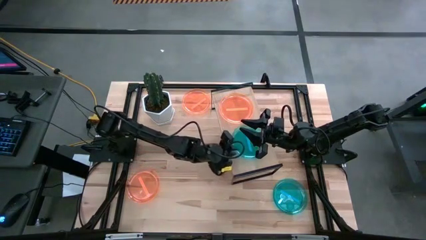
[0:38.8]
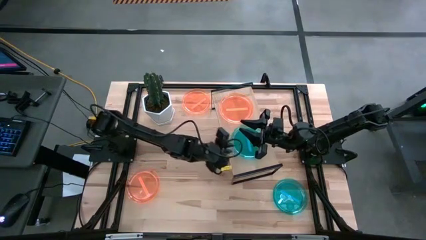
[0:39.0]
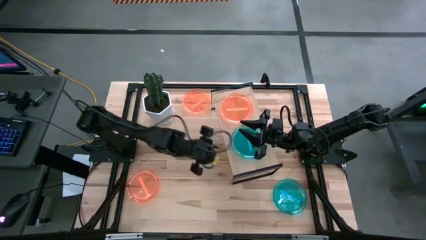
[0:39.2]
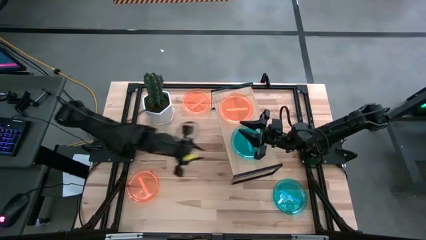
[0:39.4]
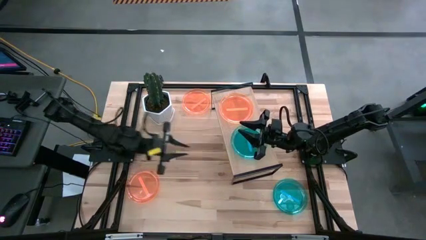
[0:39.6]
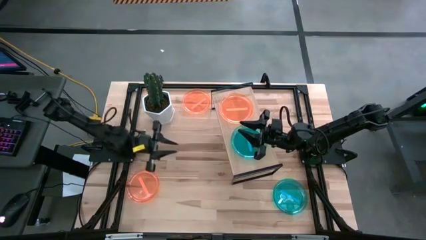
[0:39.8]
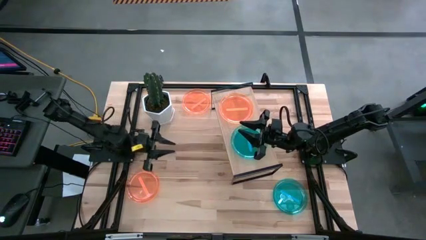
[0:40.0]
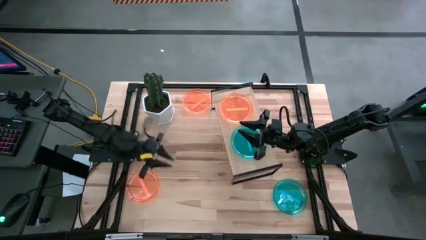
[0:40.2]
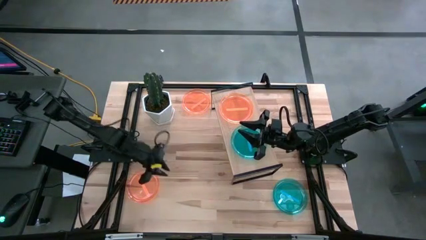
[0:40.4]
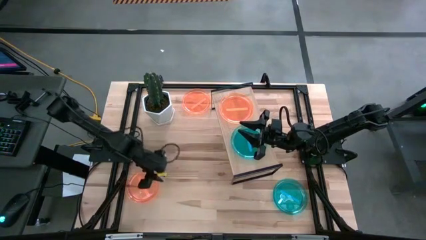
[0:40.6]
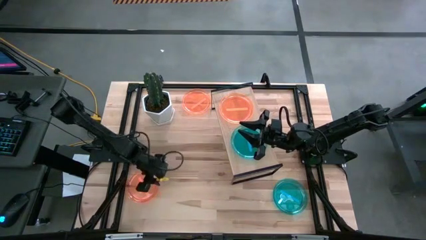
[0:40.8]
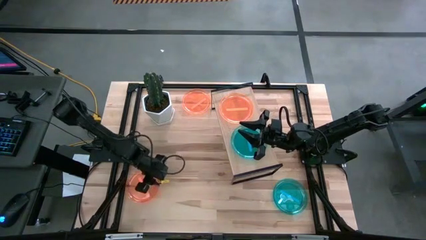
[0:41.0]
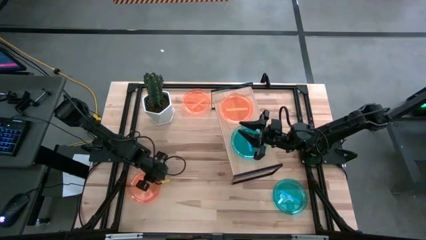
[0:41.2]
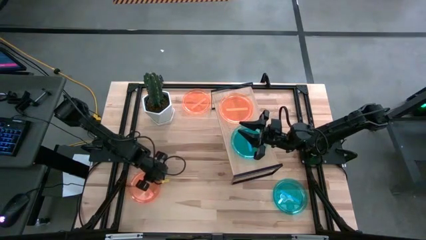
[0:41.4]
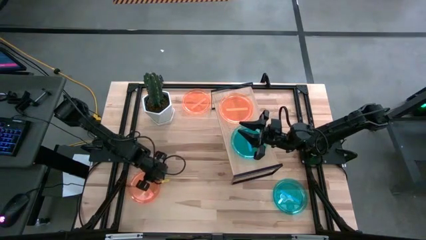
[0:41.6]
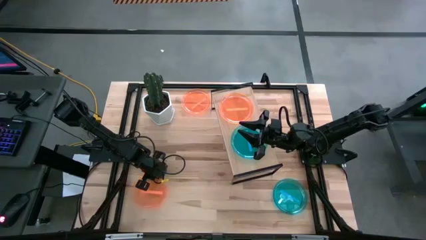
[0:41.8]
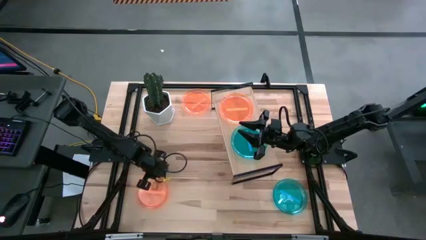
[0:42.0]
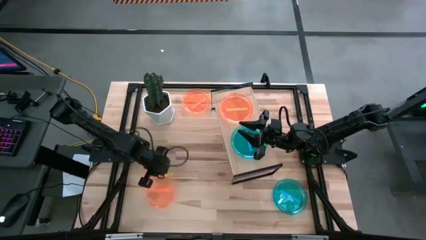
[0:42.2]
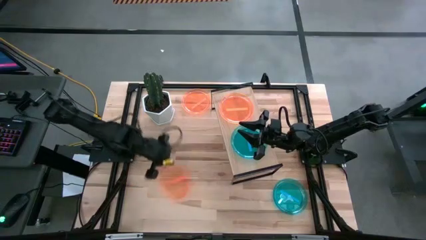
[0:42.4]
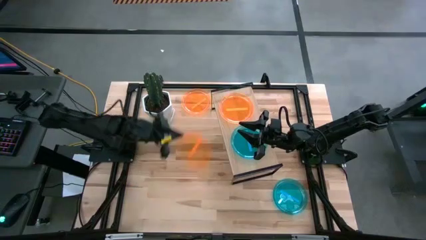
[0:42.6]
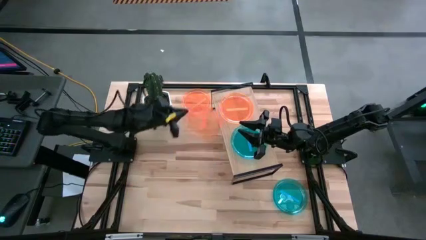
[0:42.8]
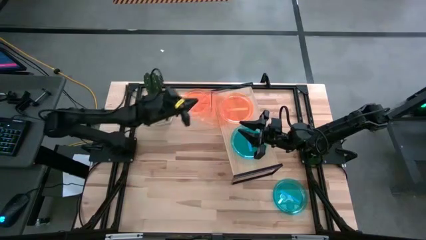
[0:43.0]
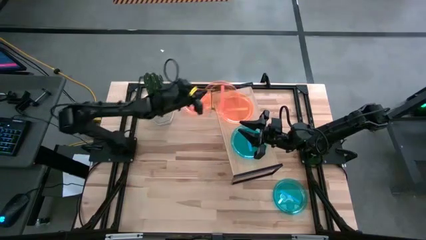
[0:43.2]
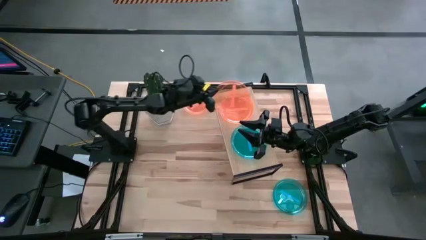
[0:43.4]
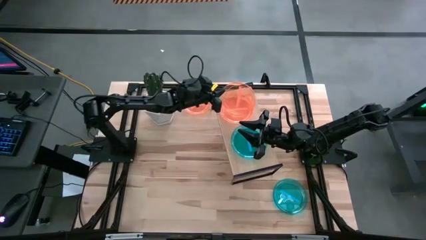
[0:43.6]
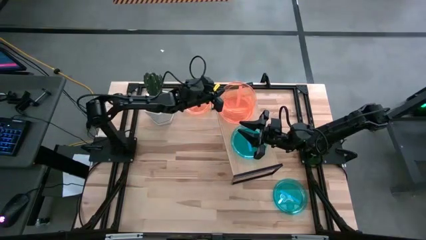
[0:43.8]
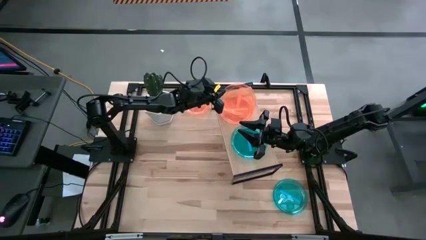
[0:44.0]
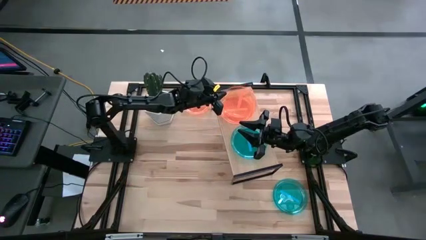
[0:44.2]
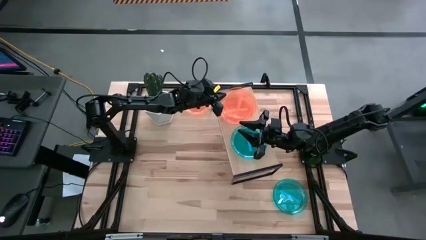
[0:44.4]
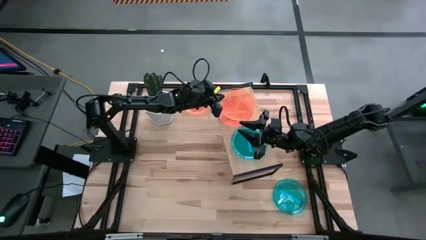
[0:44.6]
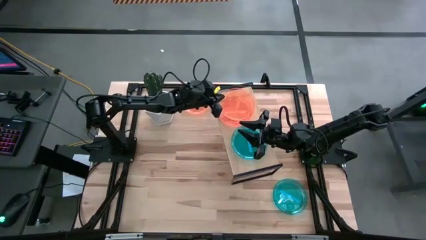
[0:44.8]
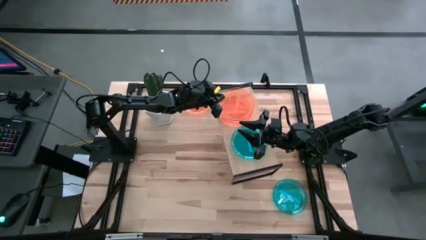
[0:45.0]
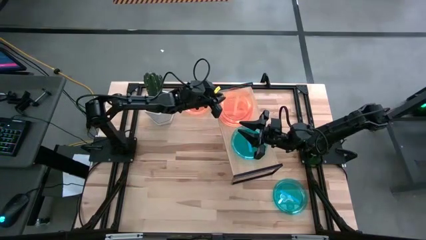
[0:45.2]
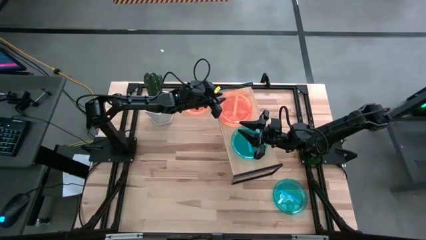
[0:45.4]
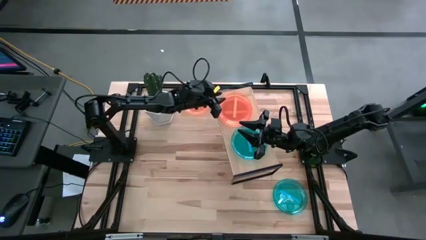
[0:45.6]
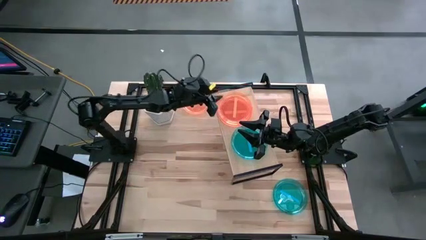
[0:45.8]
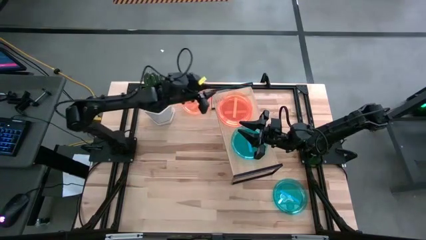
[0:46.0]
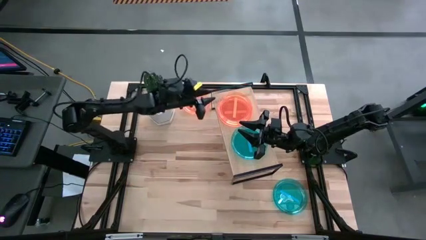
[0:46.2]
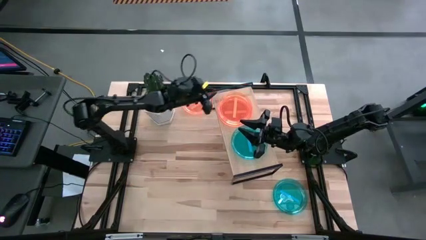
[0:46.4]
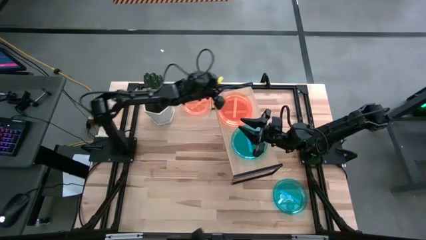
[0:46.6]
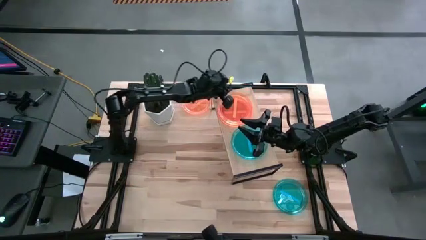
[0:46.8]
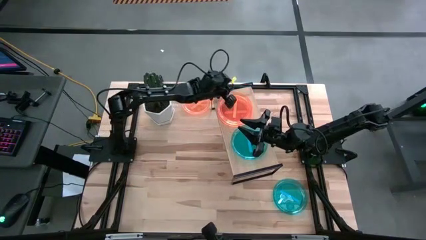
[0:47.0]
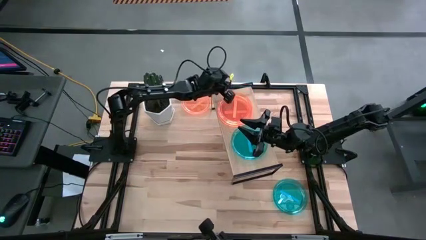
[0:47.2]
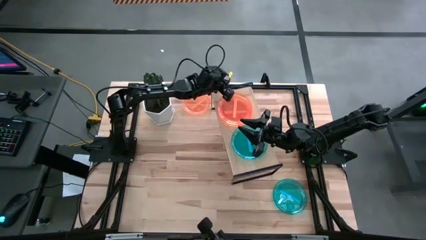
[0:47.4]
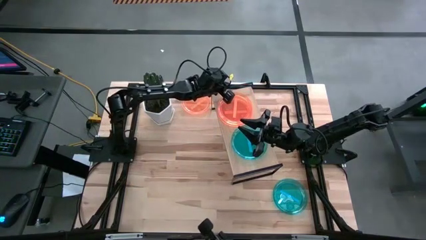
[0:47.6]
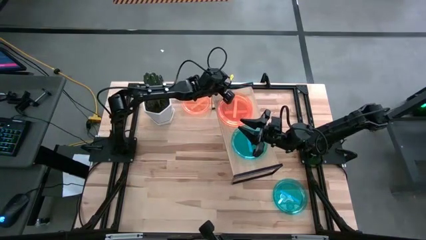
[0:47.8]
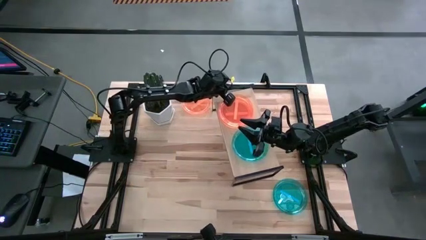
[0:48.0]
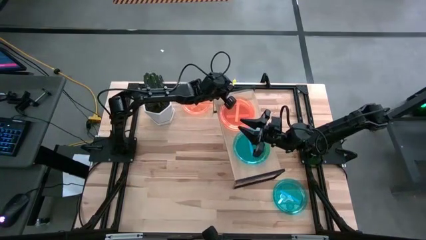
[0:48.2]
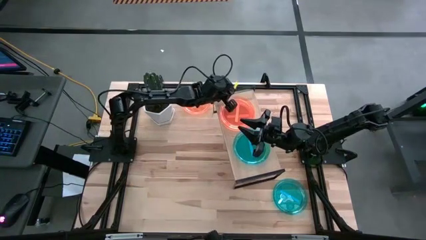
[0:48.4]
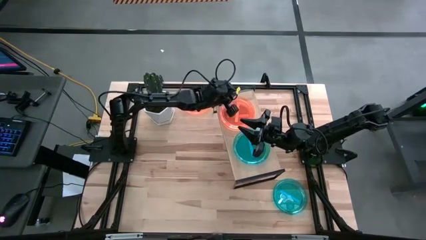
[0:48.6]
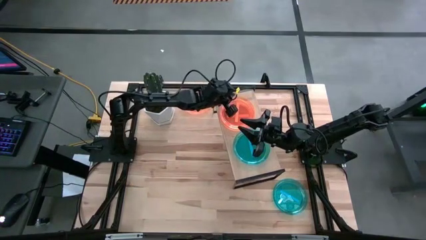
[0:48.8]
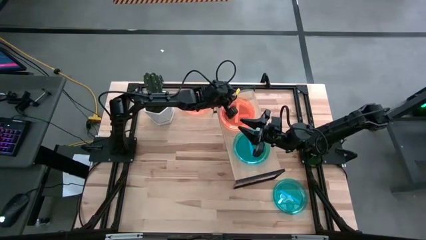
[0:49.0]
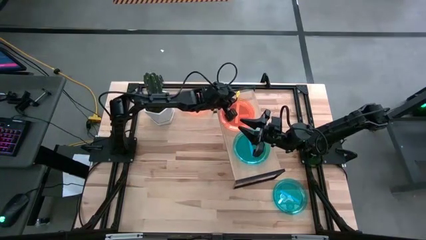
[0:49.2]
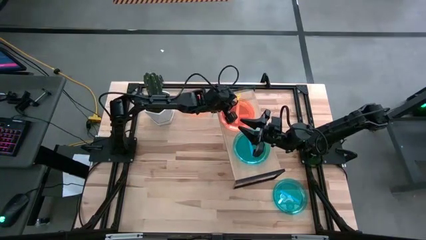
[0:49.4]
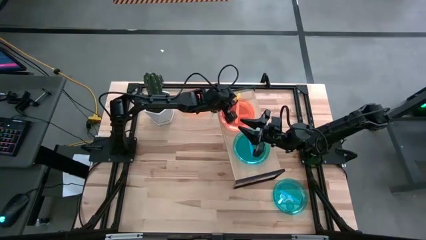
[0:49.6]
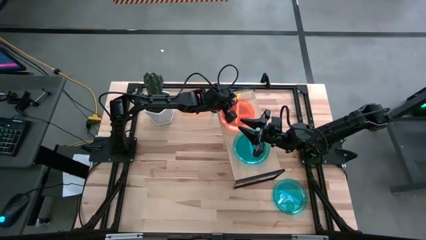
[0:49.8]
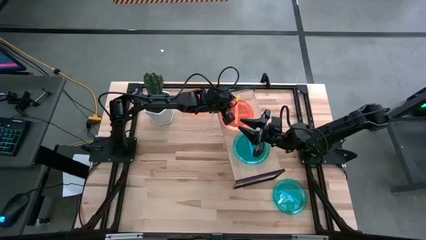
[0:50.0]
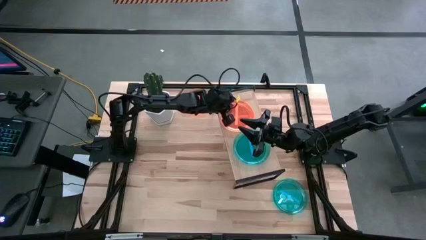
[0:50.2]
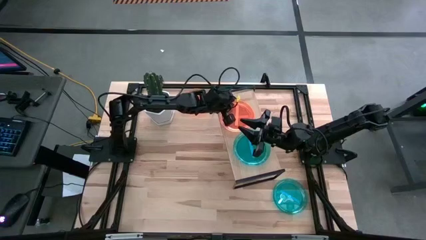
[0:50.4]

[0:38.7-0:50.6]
Task: Place and stack plates onto a shelf
Stack the bottom orange plate on top of the orange plate on the shelf

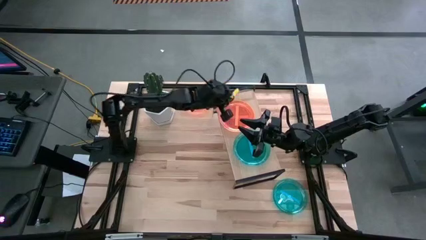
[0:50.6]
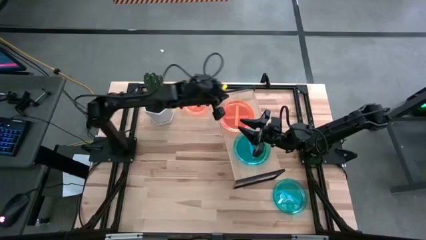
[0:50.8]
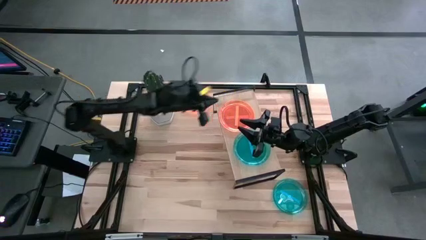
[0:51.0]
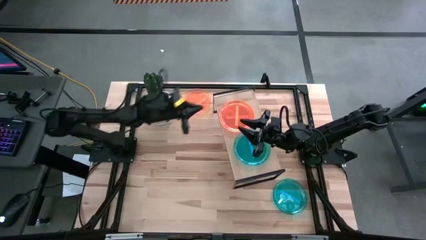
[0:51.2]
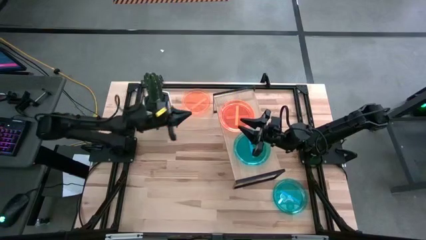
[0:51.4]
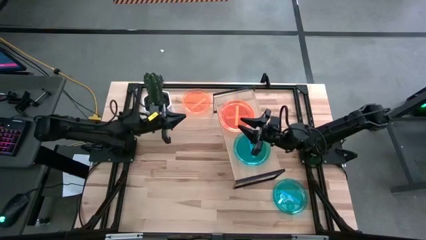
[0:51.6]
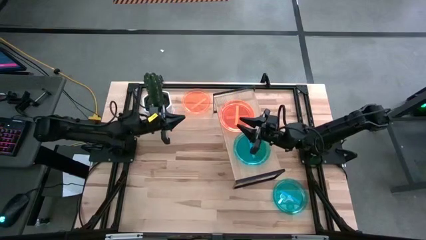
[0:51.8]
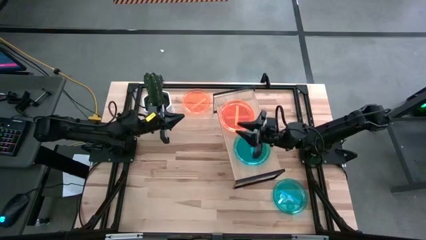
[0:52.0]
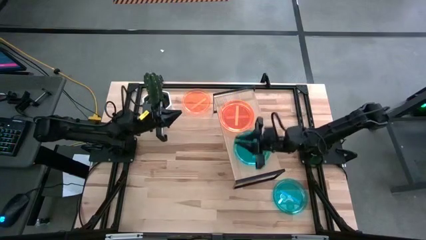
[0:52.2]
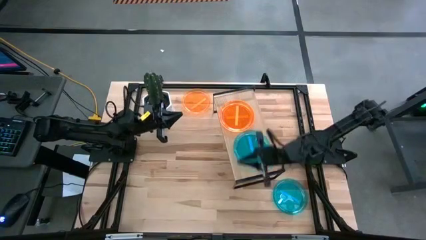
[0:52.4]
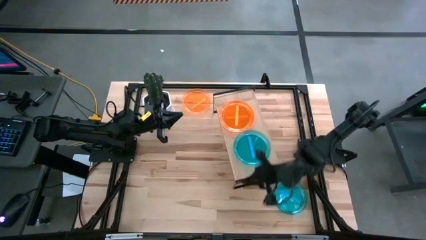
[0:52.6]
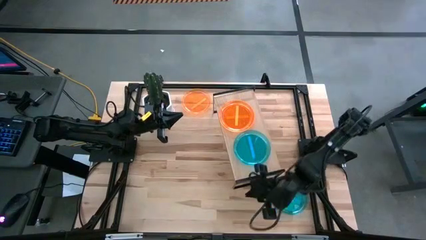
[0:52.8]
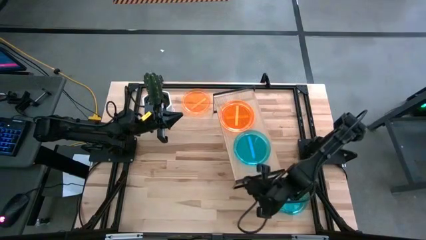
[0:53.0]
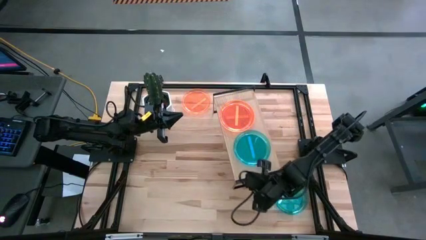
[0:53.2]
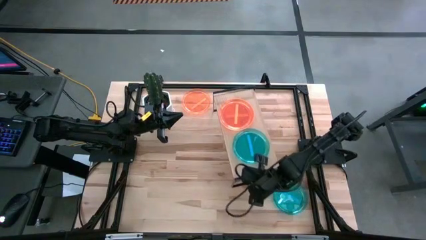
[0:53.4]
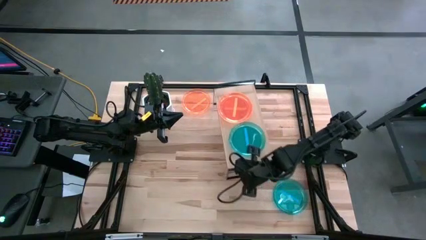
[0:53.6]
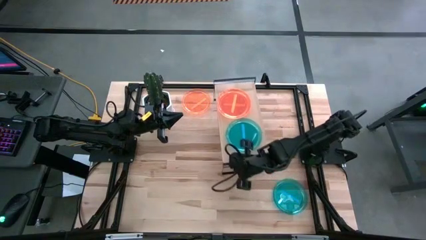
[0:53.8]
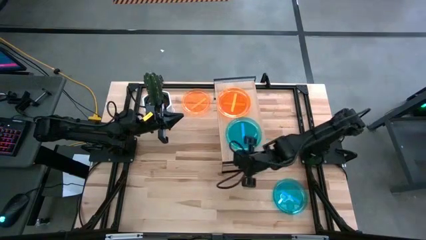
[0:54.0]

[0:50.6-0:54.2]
Adjust the shelf
